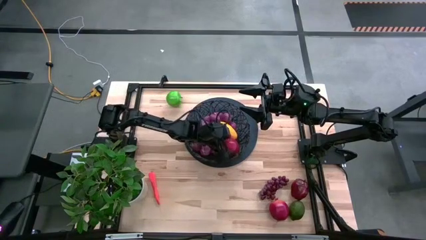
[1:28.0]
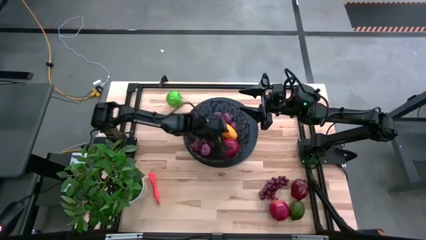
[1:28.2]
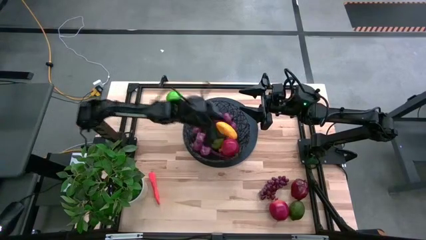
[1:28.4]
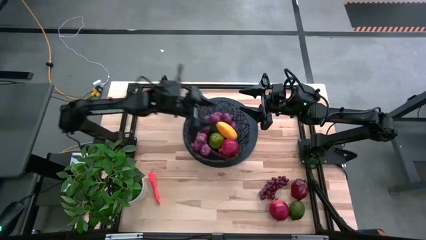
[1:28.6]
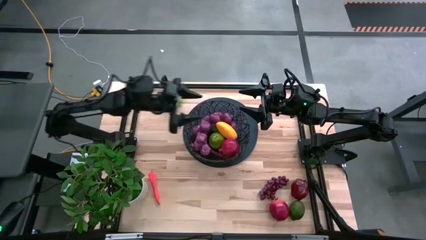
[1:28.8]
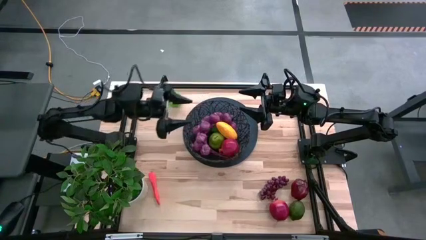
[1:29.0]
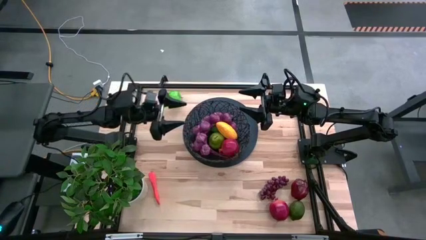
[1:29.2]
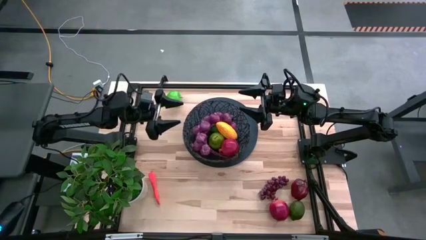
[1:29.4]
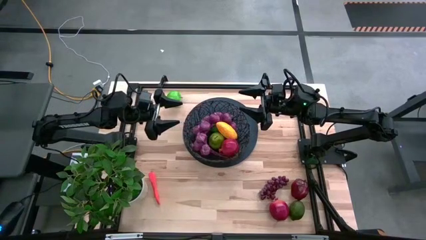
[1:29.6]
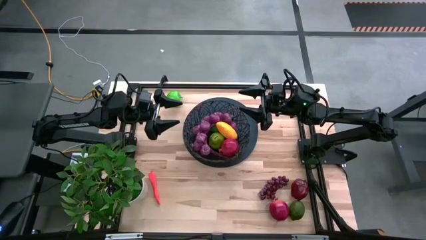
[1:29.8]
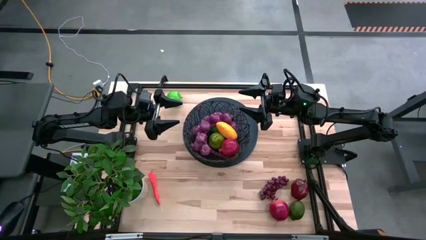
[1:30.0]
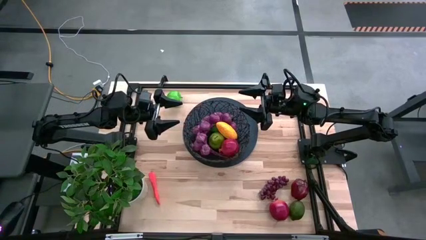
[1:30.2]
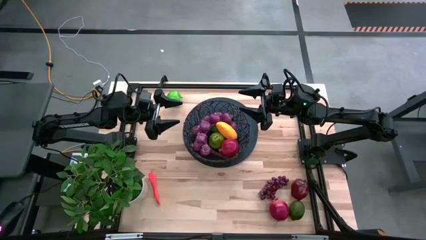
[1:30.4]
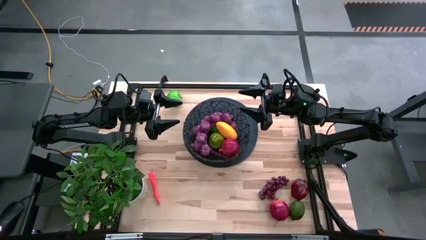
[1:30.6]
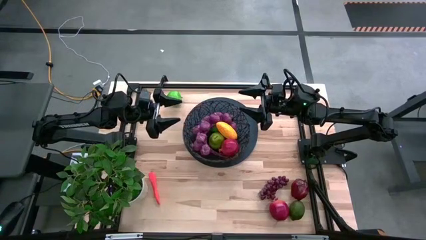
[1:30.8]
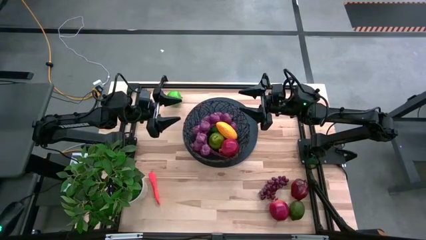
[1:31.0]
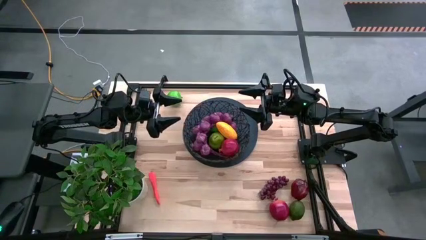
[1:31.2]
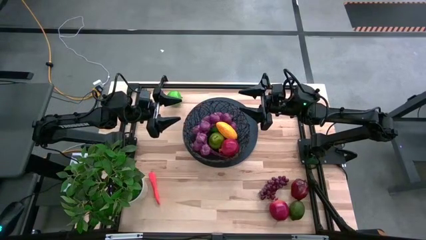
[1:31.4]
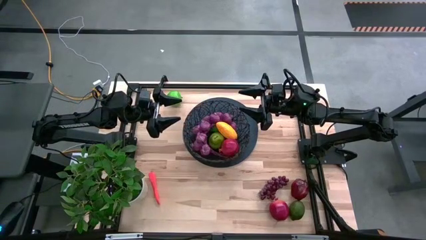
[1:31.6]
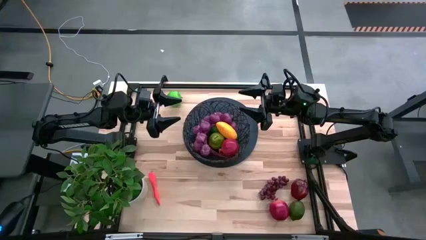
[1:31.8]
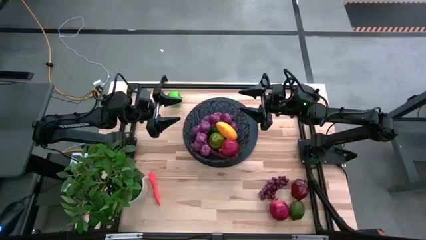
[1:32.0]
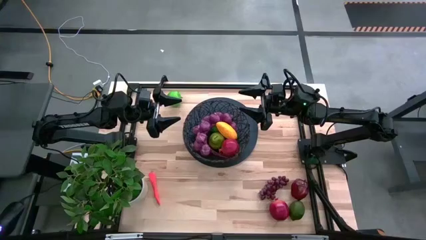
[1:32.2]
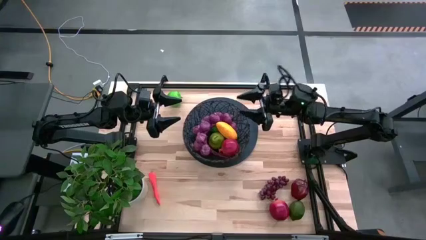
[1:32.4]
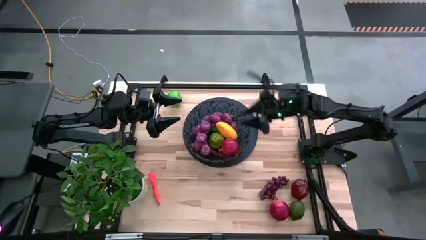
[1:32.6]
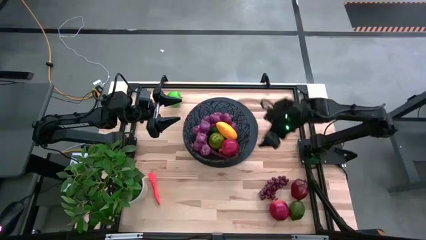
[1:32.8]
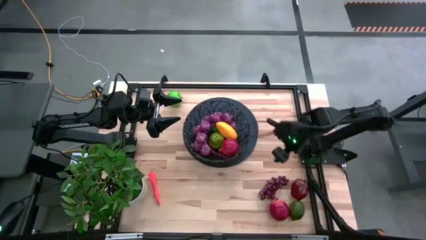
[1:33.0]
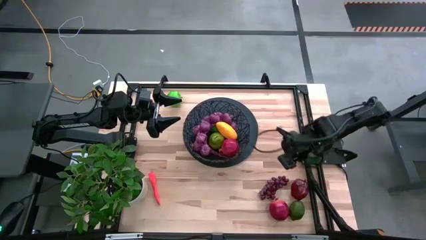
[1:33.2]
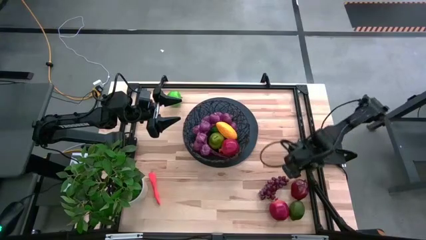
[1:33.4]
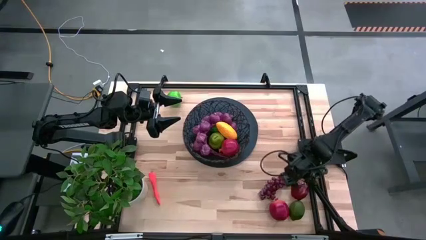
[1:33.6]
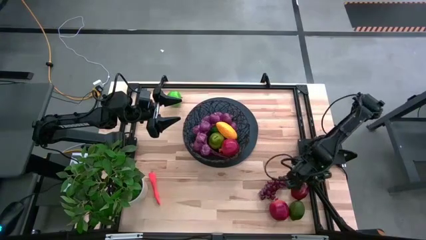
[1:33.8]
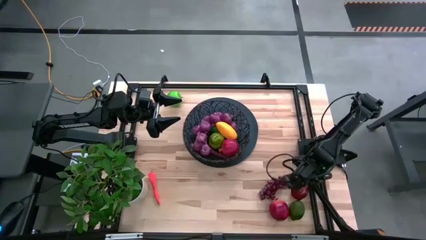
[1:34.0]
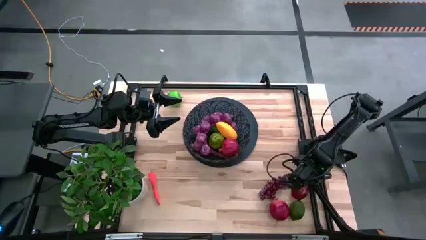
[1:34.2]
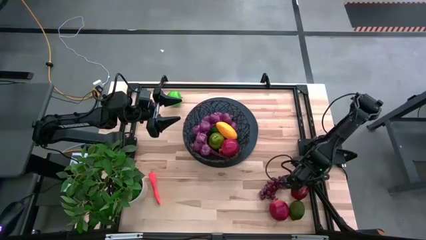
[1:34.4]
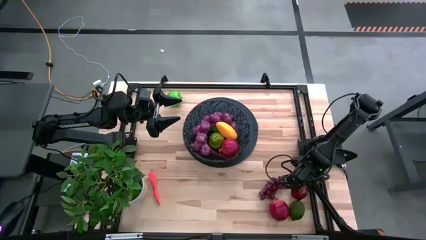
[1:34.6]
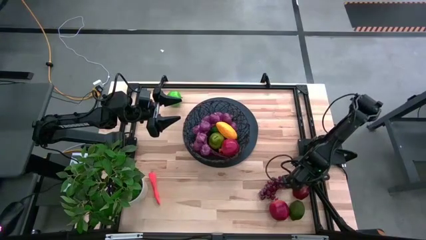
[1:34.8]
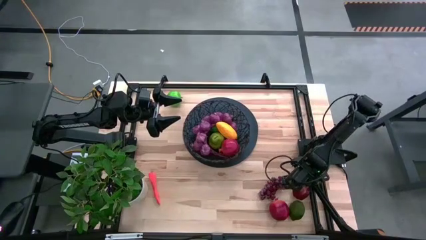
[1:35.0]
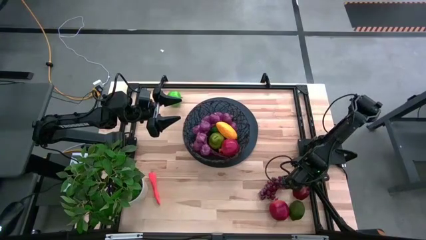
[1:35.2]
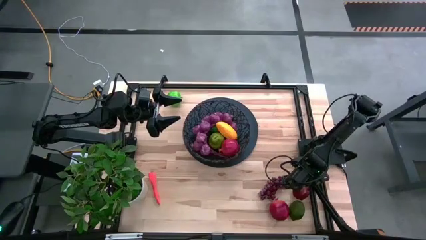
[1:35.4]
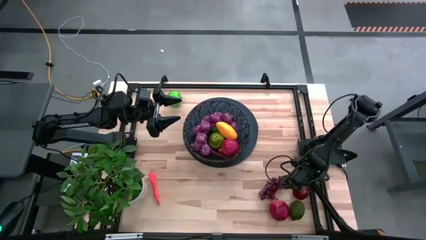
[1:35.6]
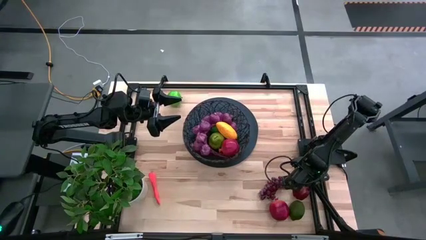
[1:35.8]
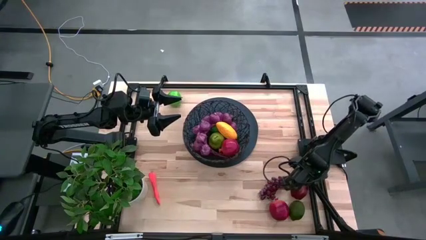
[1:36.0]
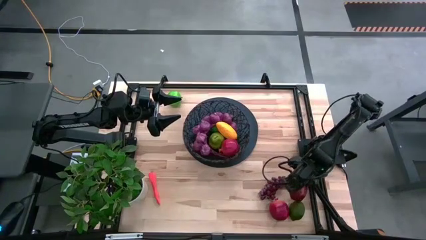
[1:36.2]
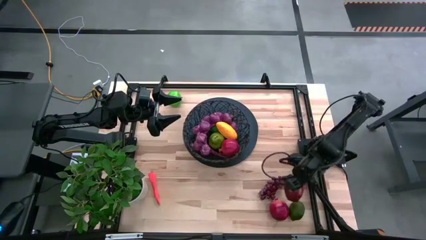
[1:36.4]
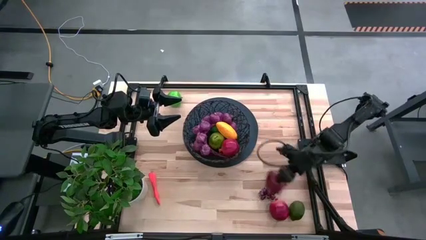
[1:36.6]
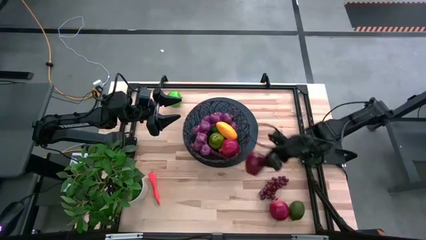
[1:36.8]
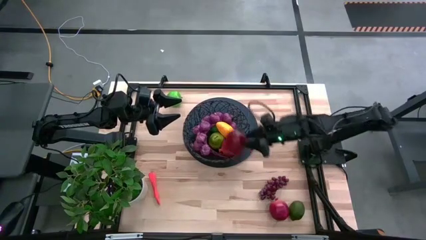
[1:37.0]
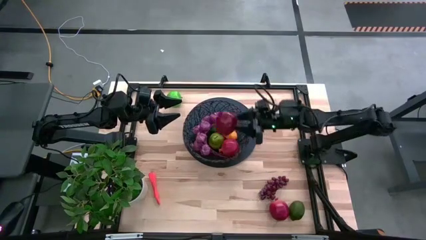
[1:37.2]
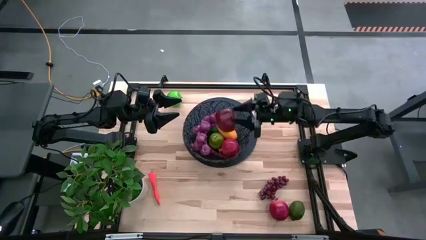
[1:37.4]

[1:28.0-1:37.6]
Task: Build produce basket
Put the red apple into basket

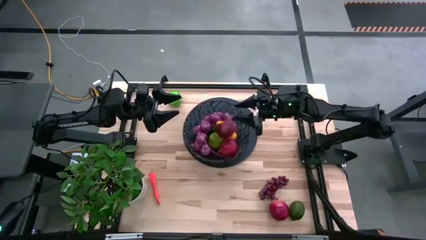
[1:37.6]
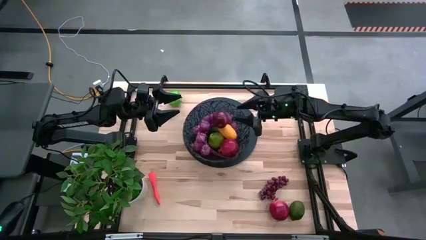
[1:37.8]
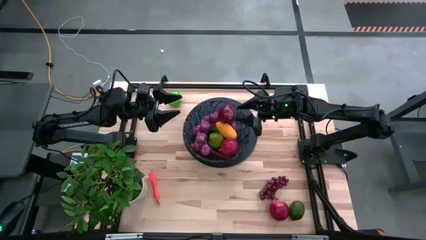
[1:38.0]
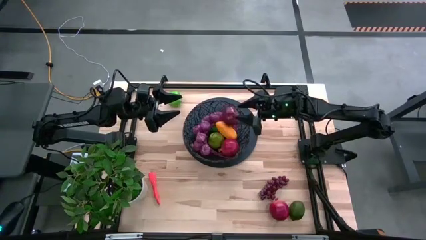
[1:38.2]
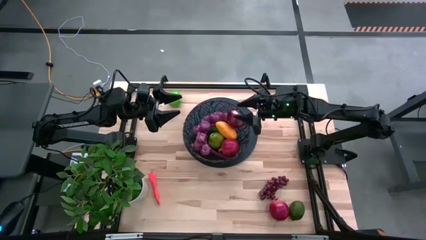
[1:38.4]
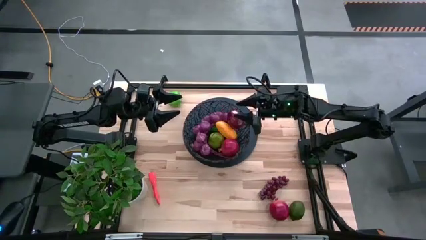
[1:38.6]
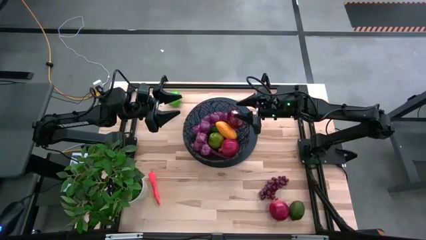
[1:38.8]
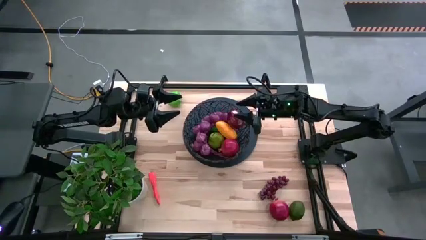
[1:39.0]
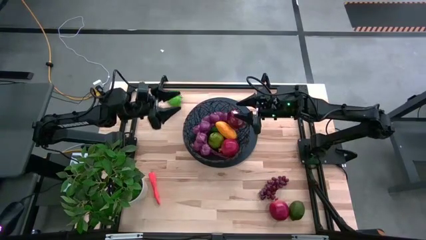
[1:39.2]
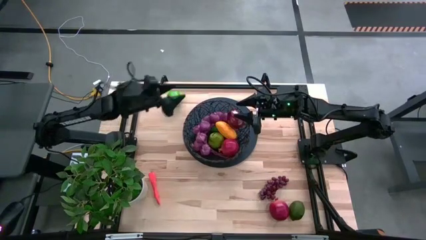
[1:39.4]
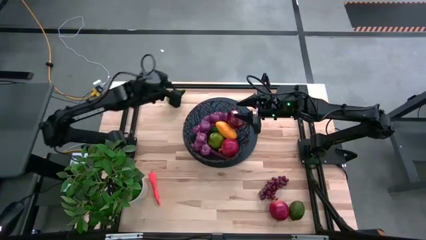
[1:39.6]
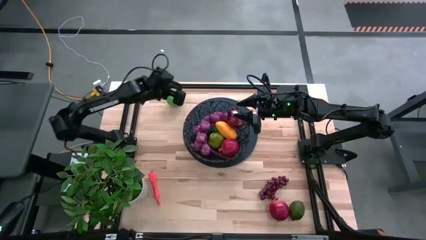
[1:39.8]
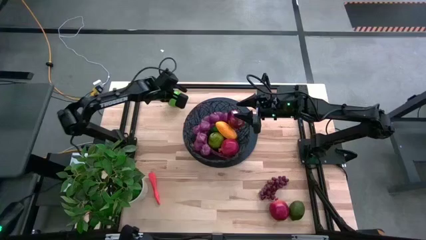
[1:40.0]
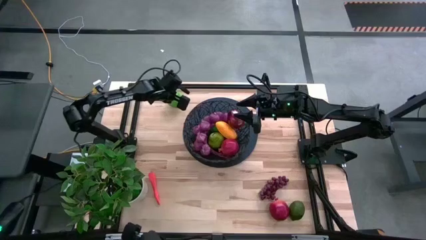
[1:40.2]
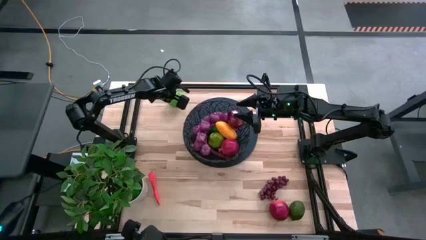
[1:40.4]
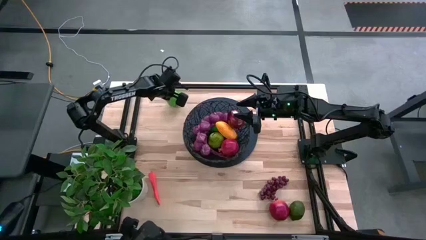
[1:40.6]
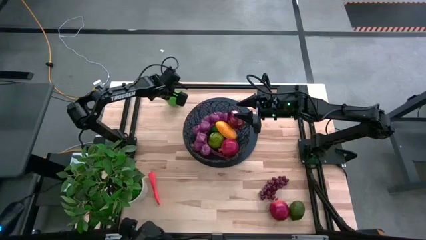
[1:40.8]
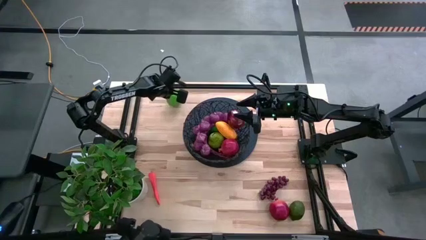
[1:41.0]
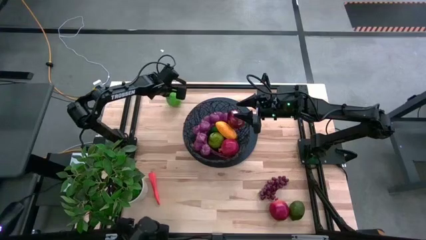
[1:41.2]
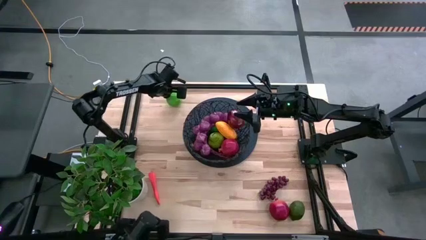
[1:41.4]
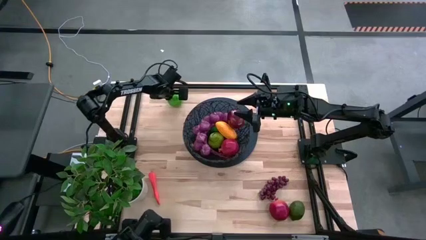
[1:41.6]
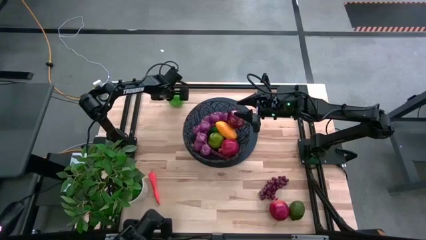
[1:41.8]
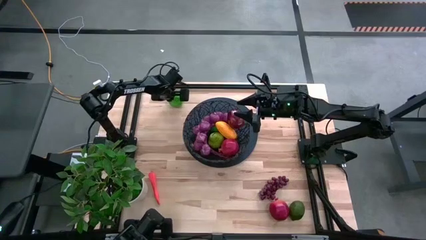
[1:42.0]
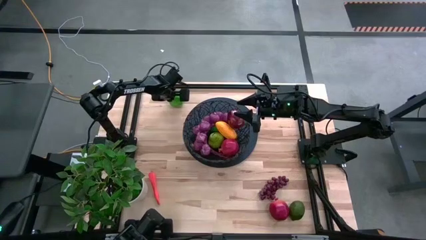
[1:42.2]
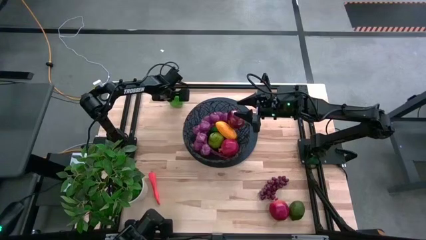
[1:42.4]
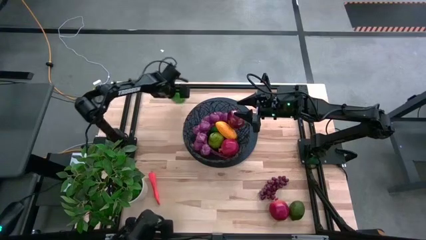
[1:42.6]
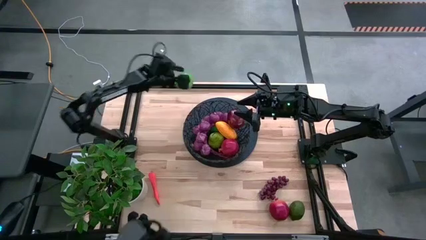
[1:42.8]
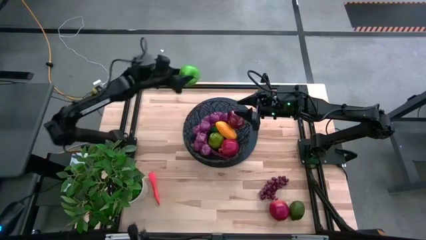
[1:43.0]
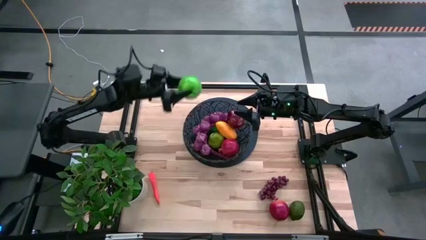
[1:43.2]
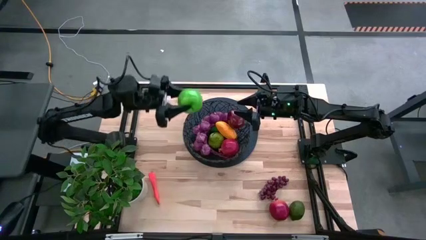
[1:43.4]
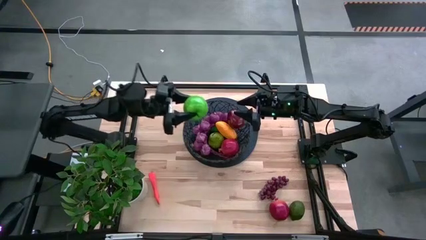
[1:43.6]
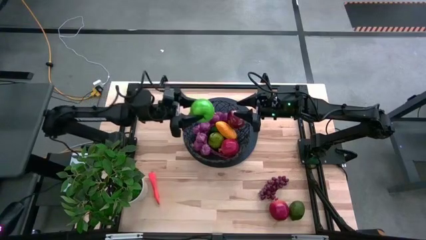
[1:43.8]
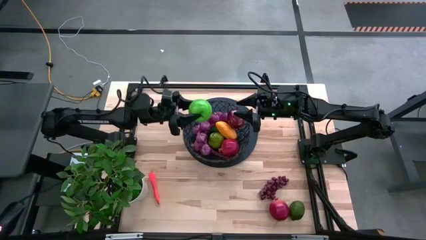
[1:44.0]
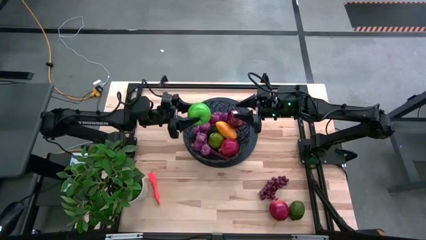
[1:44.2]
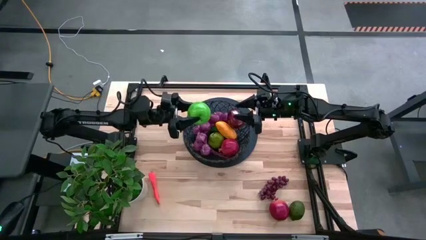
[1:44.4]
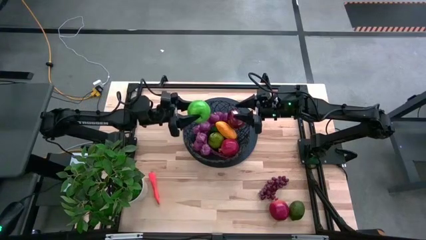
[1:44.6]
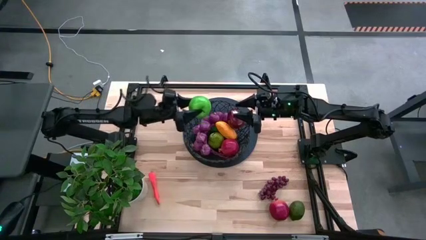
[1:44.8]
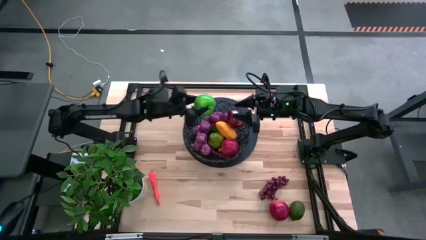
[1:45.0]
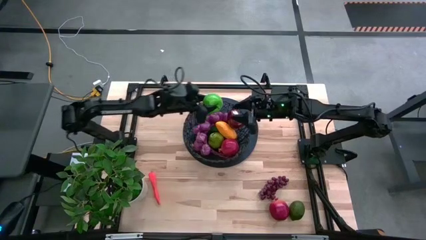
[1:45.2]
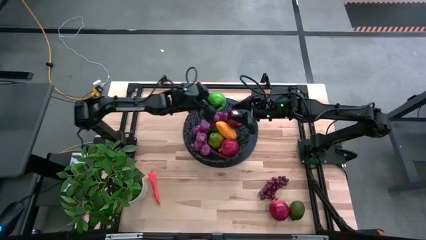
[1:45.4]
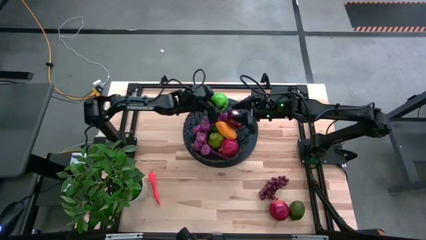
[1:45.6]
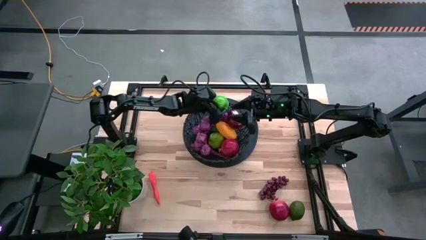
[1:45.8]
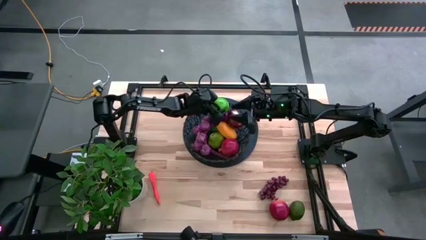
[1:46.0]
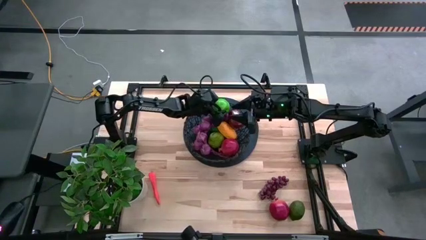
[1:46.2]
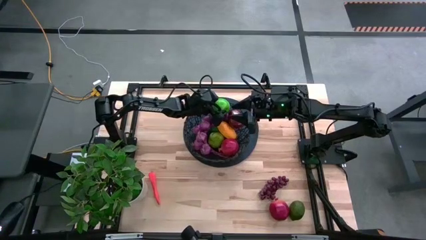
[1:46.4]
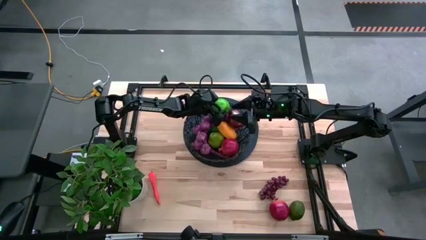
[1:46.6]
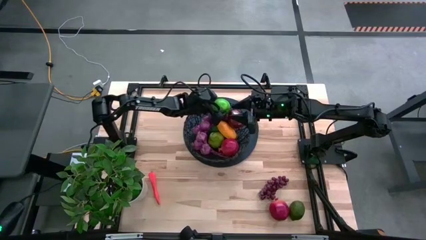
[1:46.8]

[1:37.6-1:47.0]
Put the green apple into basket
